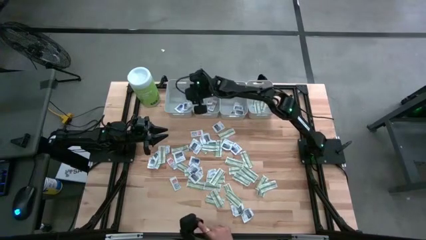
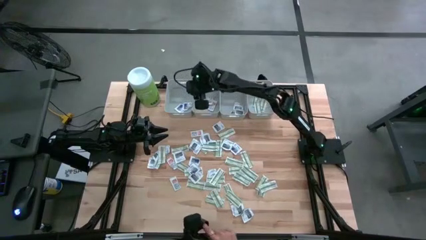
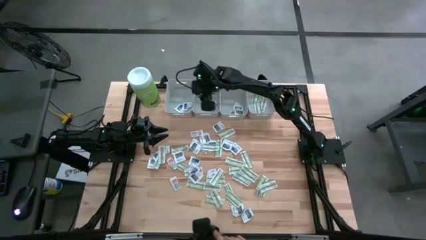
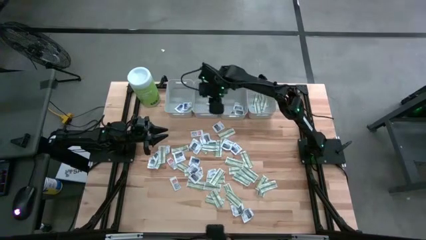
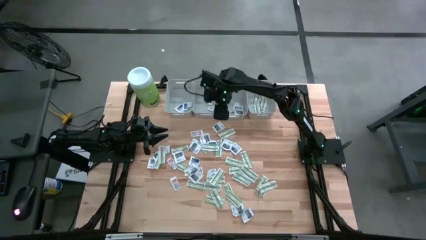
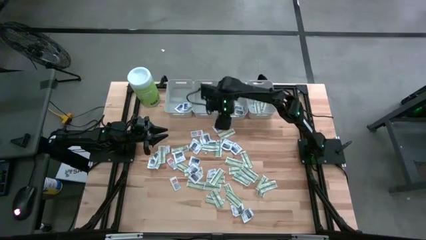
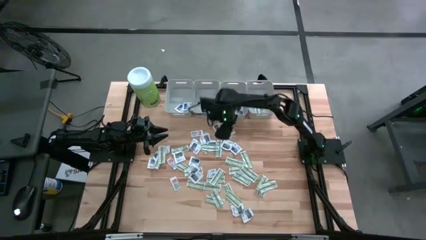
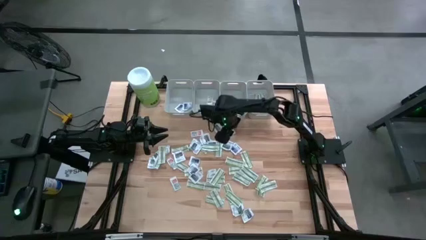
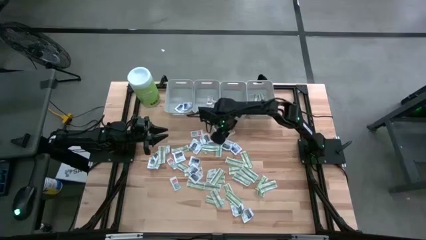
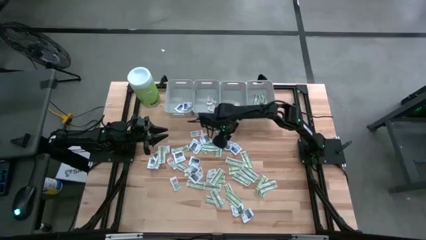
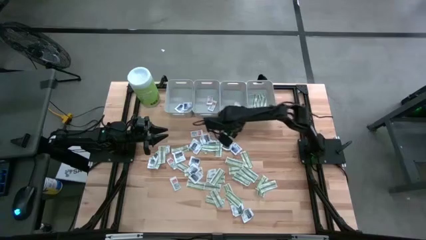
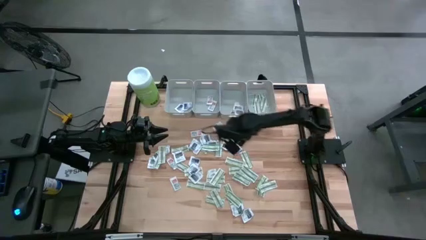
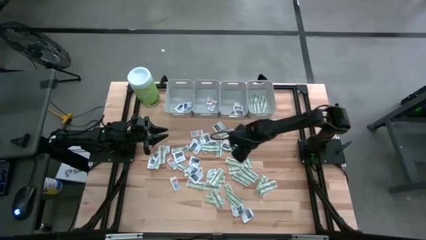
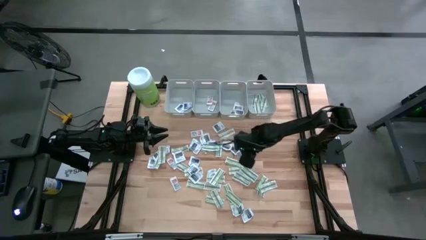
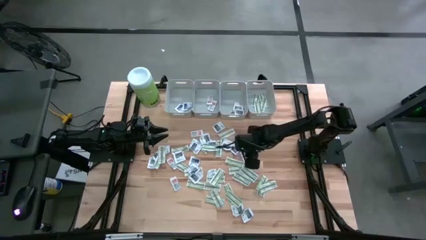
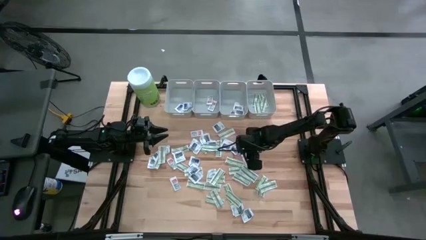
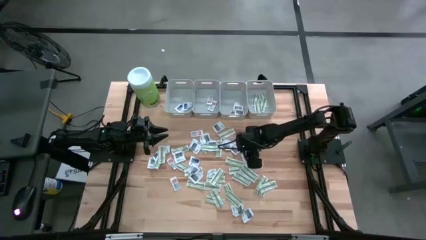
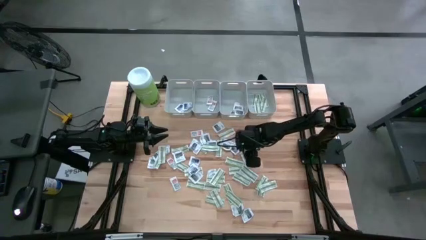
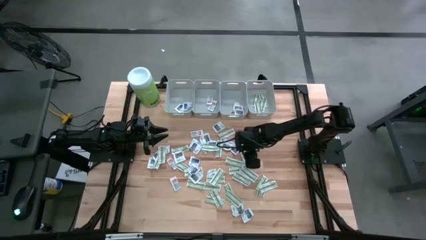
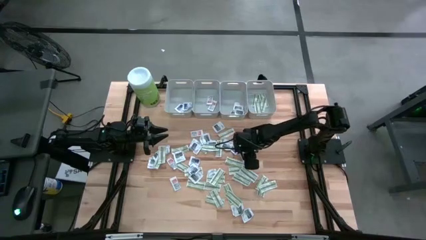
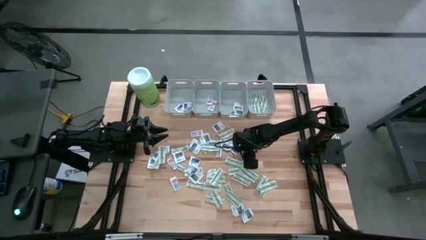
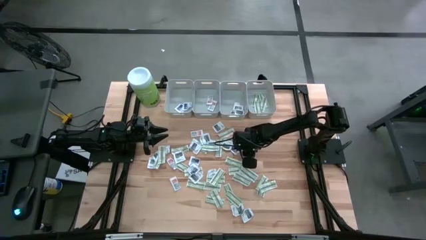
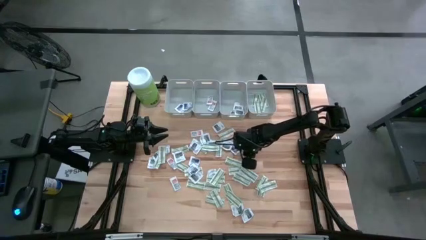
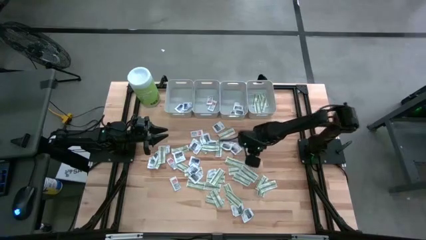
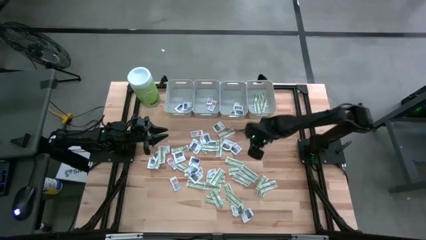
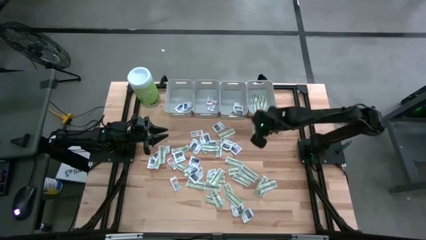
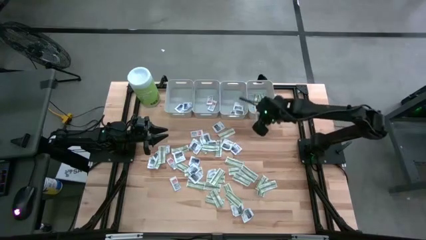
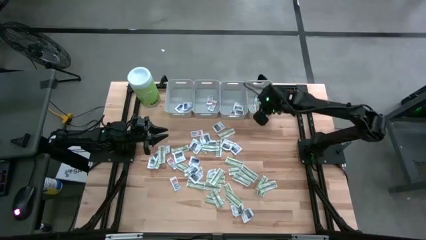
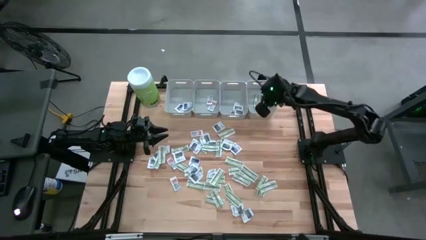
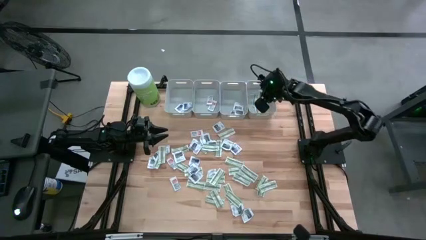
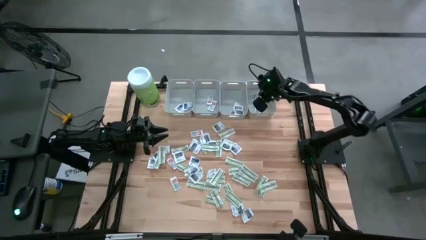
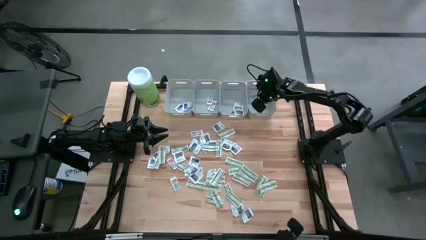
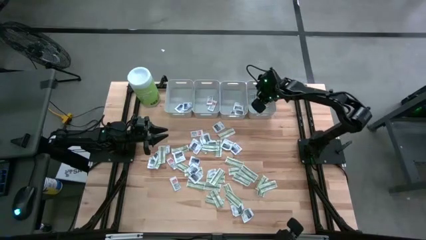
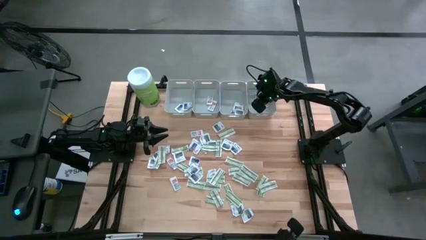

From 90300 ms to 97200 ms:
Task: Pick & Place First Aid Supplies
Put the bandage into the right gray bin

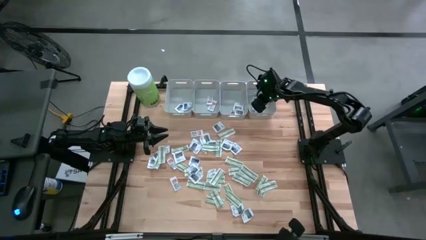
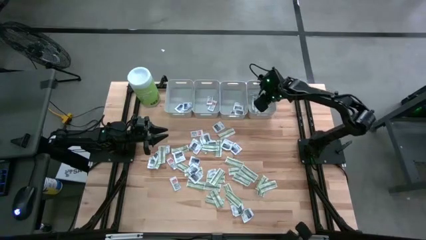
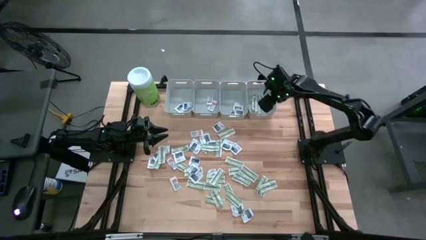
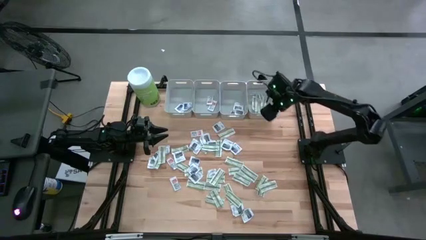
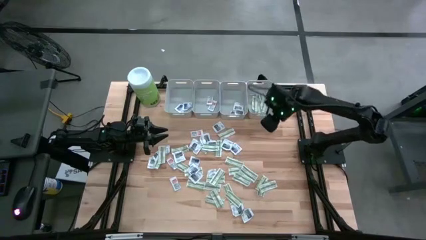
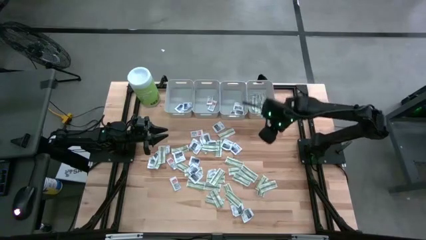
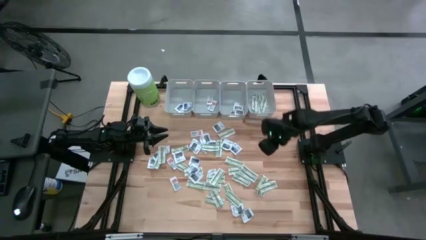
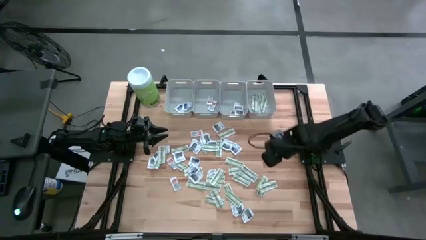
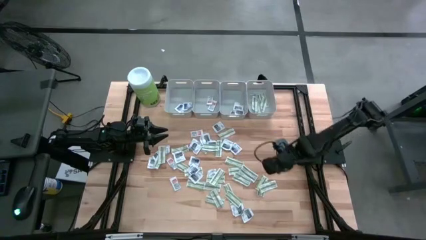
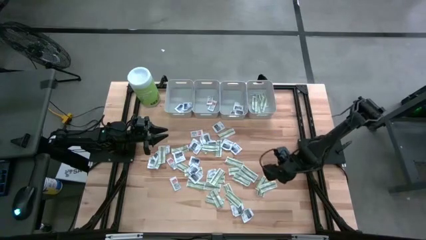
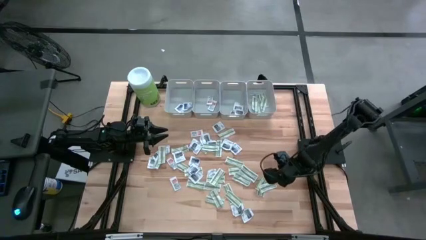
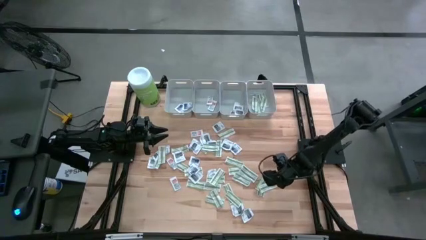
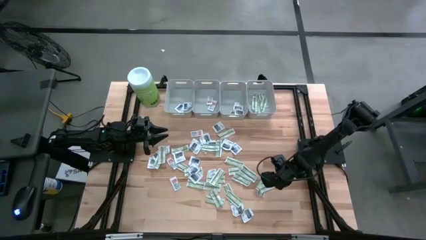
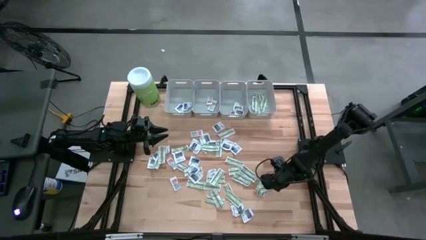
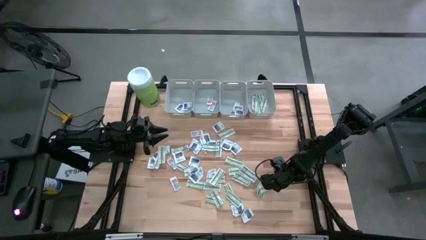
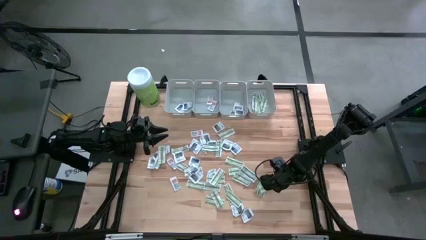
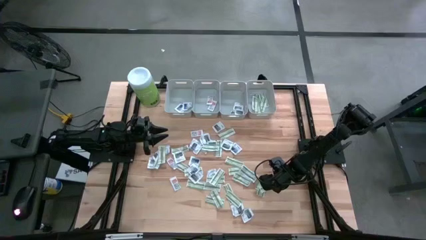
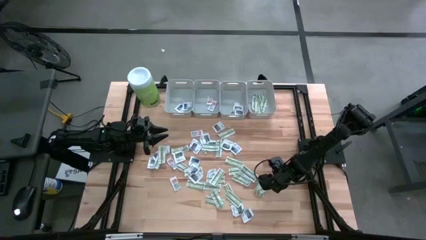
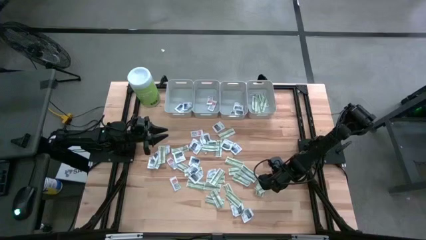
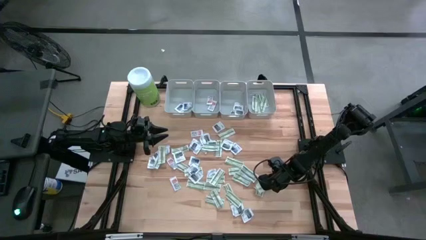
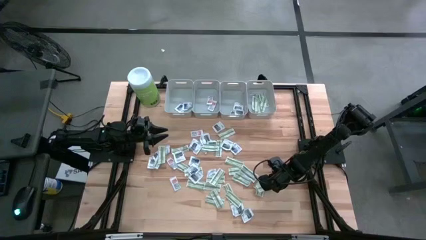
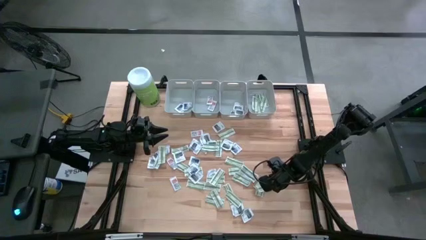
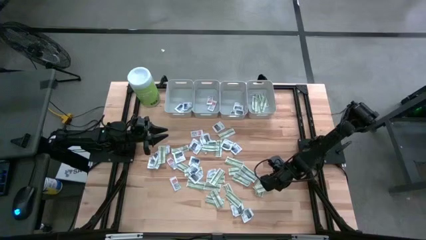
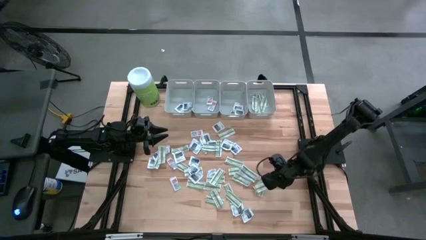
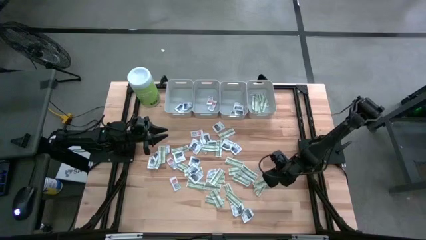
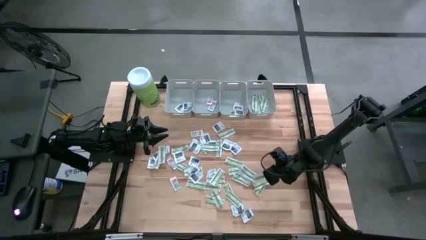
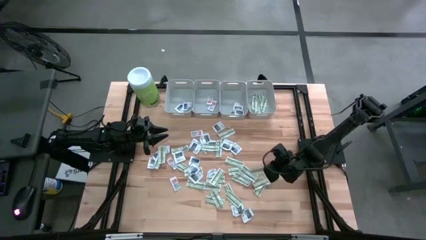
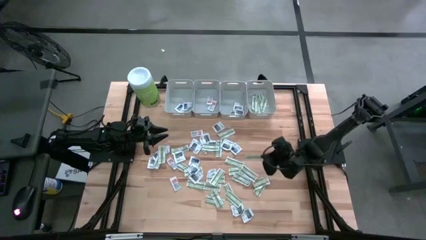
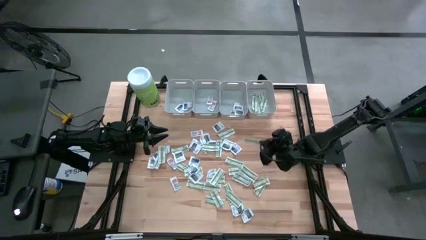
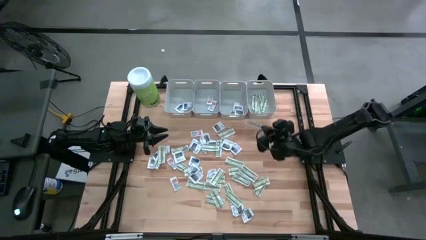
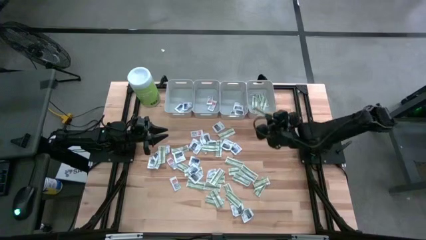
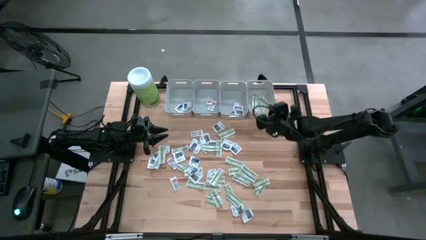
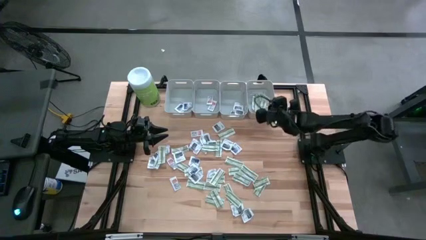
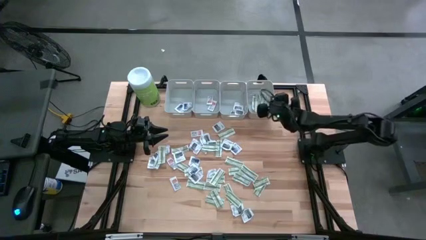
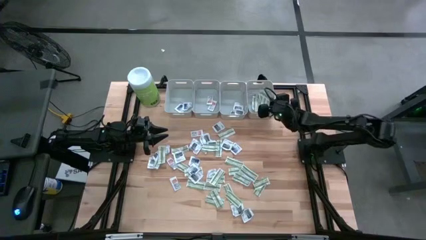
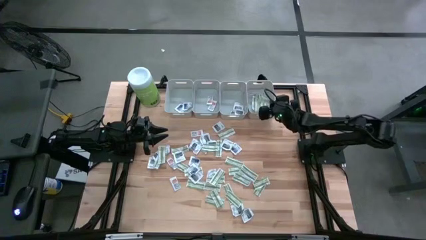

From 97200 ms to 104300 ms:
Put the bandage into the right gray bin

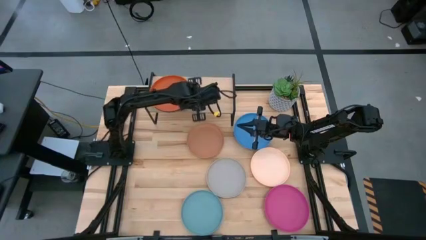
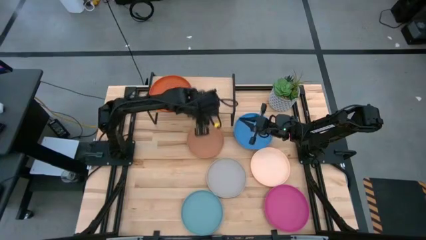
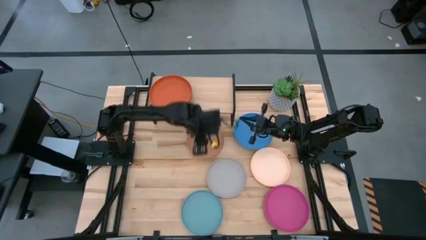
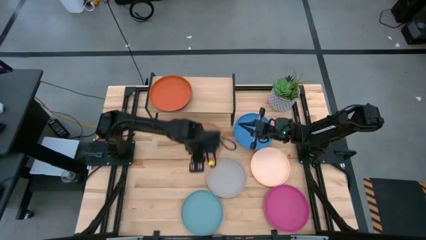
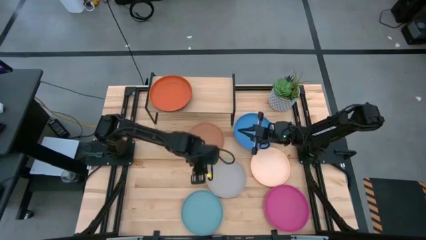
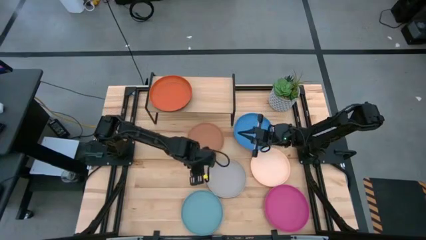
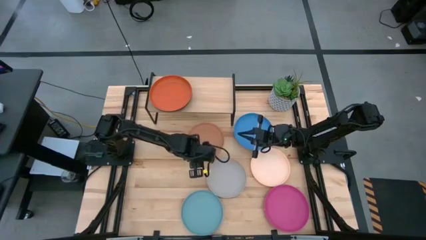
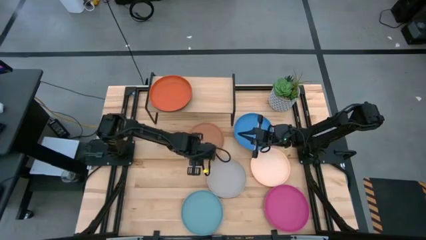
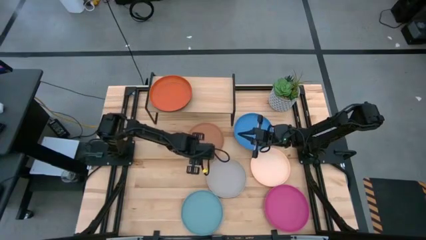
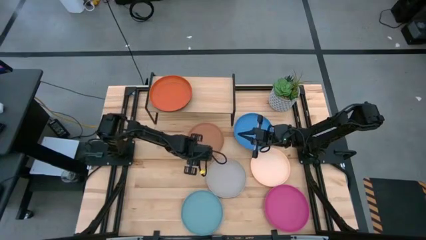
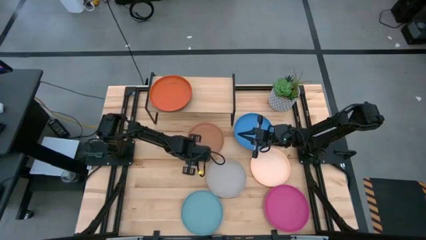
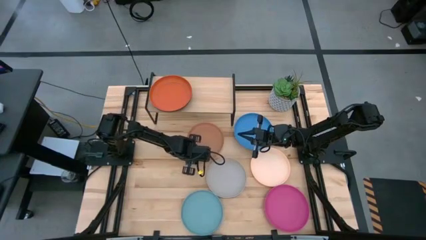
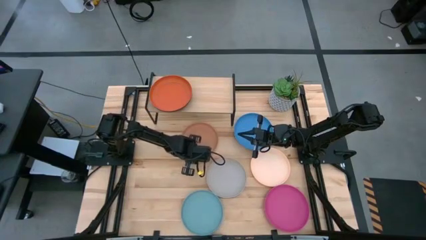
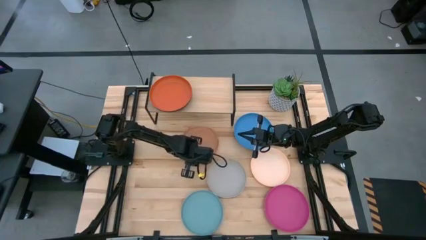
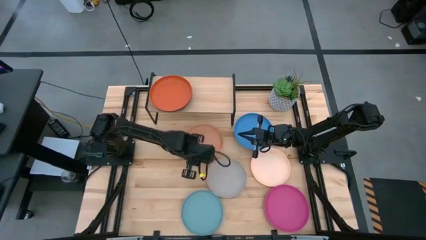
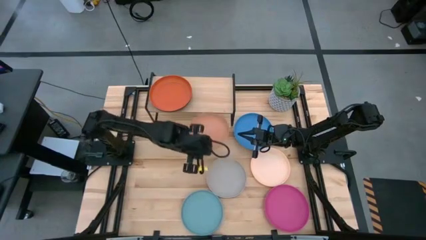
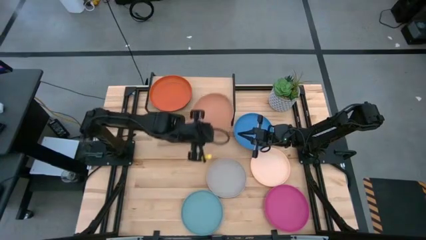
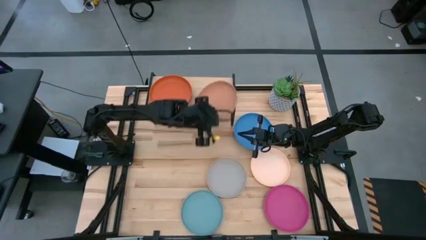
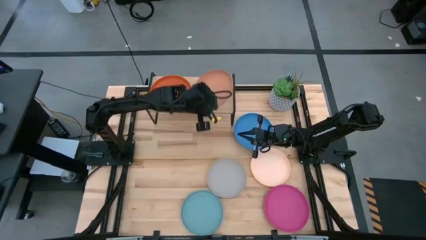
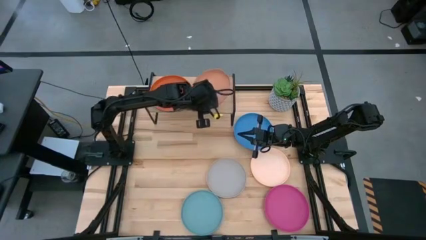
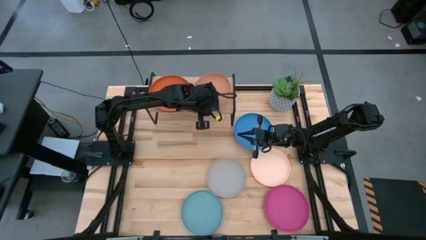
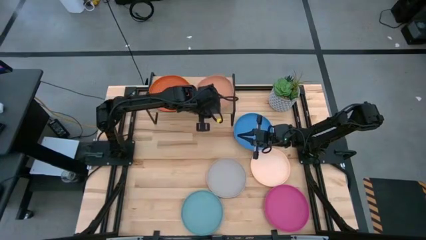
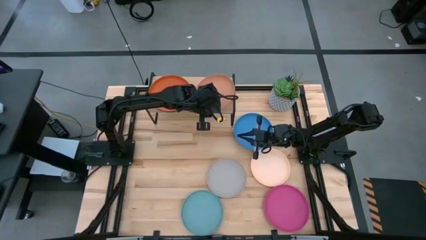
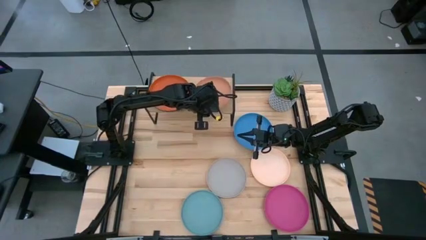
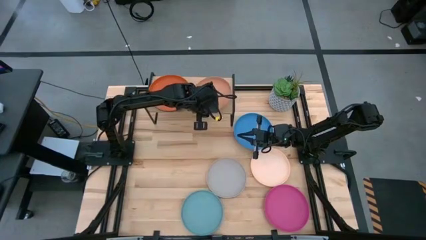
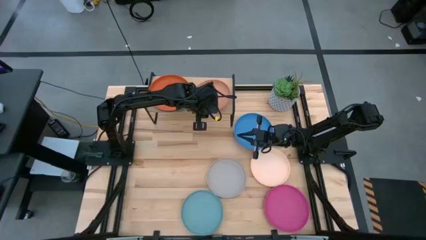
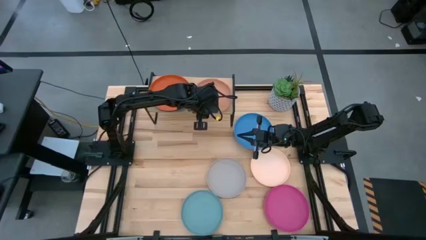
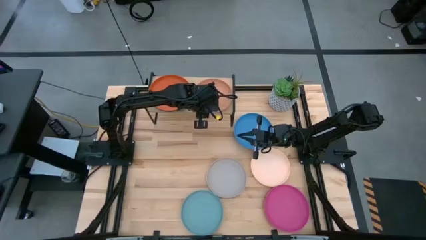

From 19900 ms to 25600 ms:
Task: Place and stack plates onto a shelf
Put the light brown plate on the shelf
